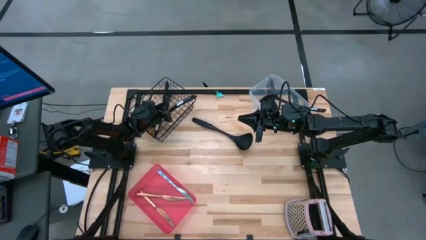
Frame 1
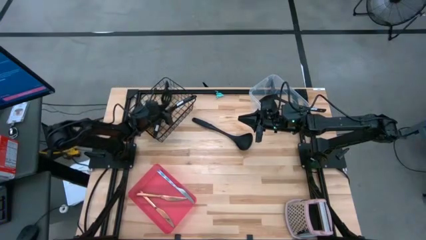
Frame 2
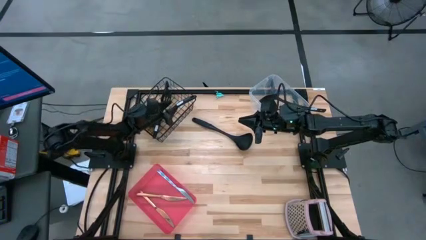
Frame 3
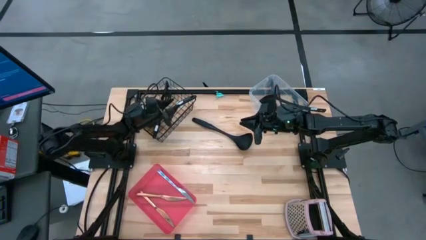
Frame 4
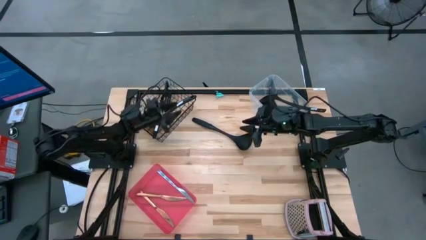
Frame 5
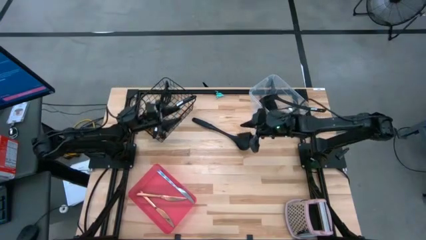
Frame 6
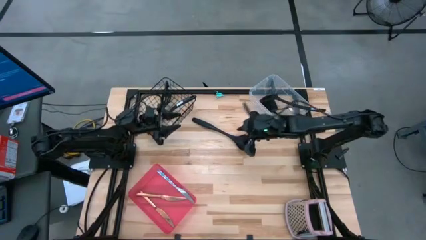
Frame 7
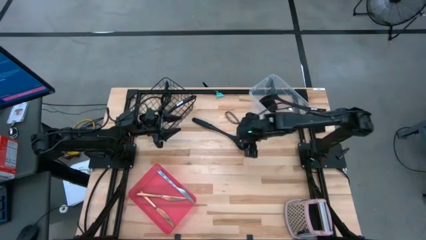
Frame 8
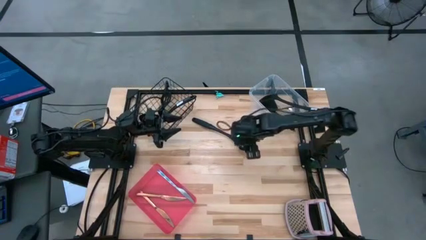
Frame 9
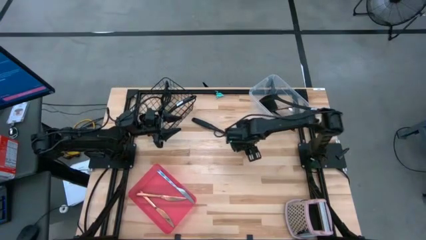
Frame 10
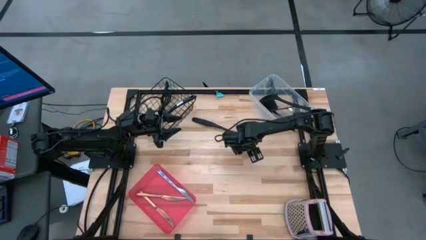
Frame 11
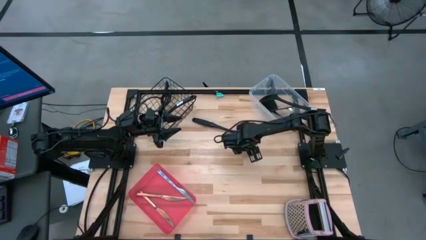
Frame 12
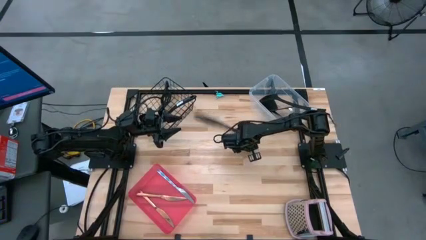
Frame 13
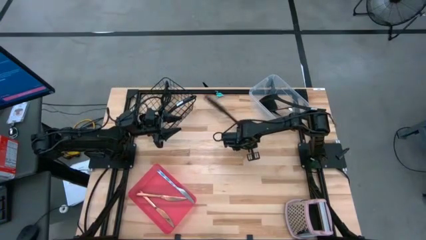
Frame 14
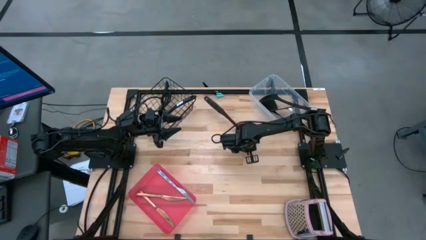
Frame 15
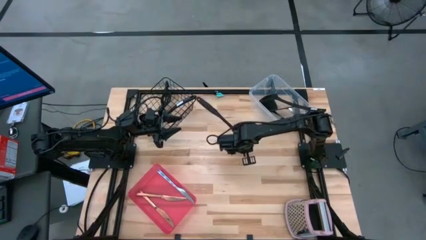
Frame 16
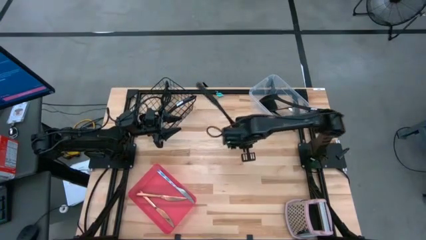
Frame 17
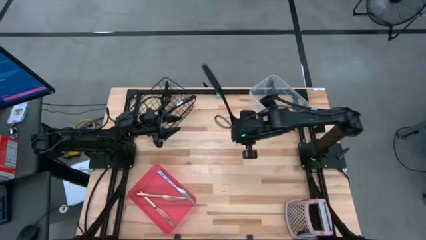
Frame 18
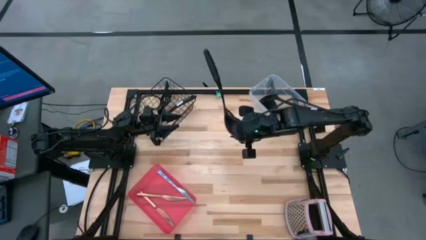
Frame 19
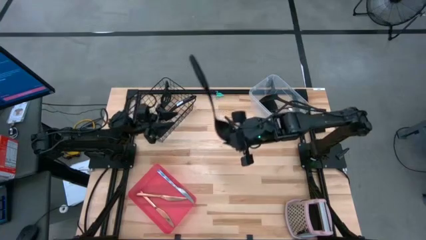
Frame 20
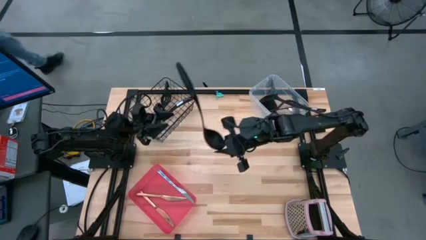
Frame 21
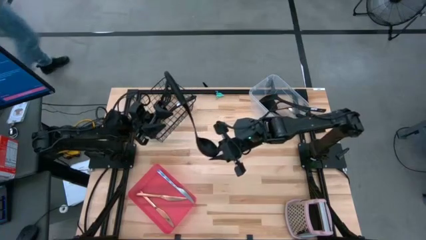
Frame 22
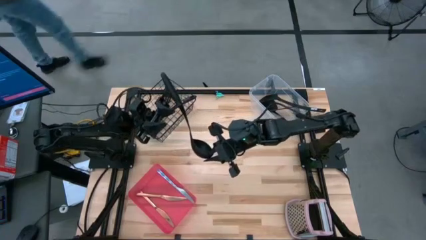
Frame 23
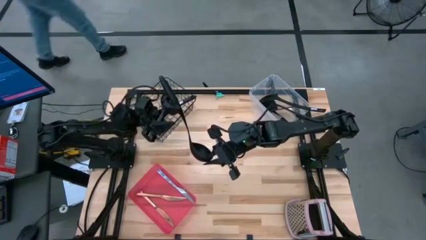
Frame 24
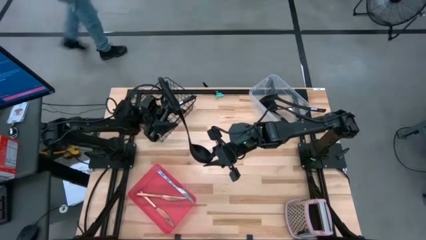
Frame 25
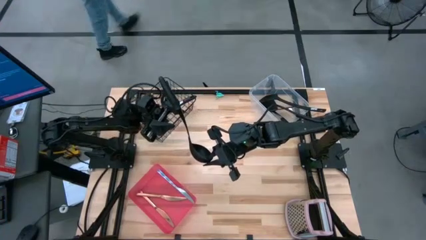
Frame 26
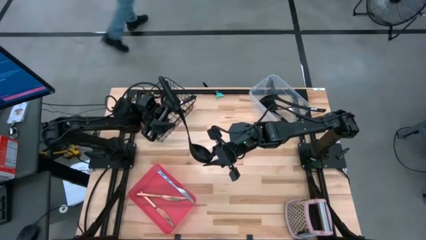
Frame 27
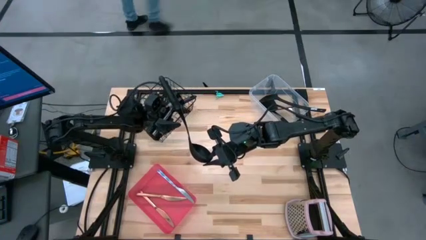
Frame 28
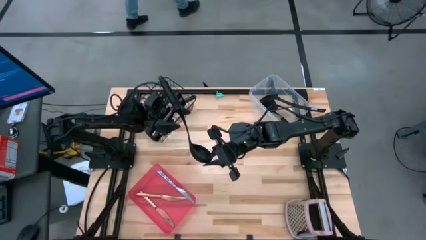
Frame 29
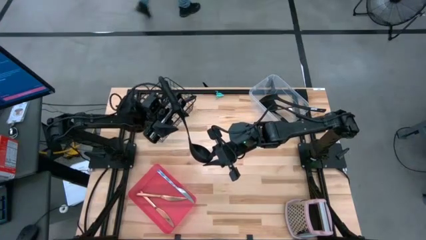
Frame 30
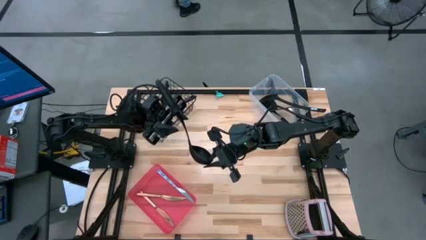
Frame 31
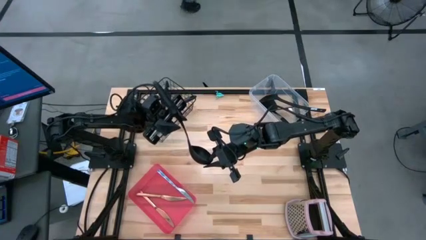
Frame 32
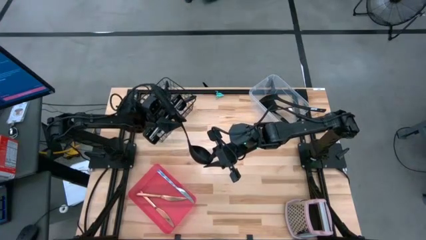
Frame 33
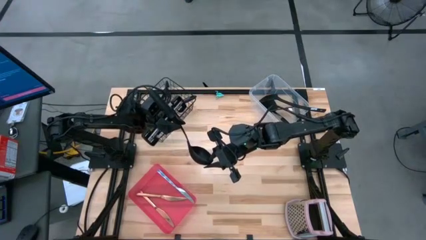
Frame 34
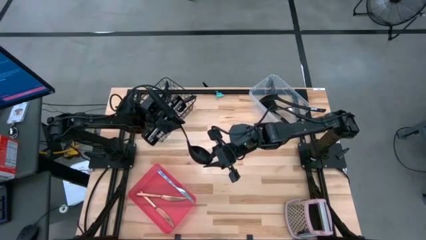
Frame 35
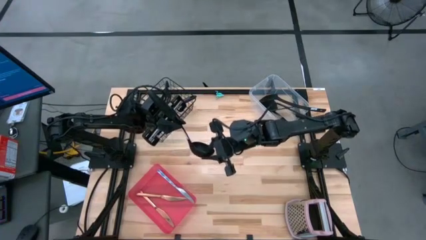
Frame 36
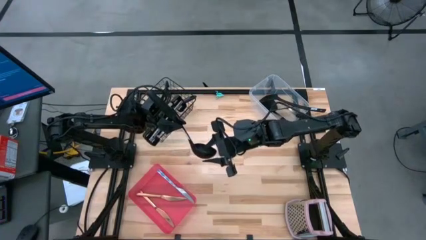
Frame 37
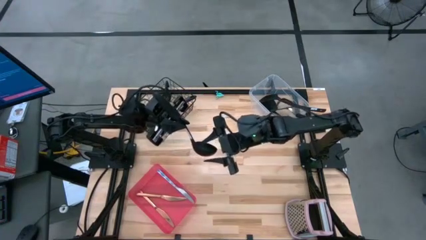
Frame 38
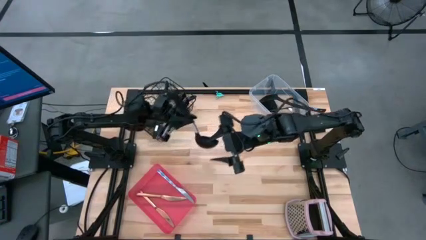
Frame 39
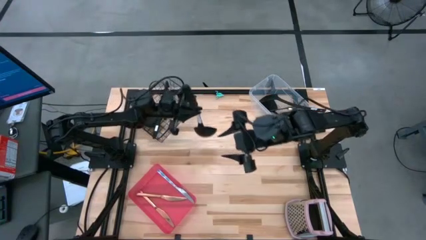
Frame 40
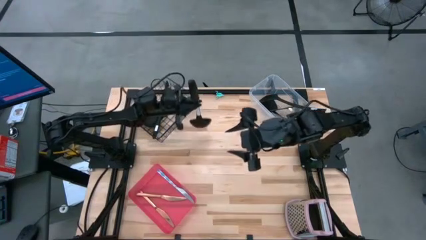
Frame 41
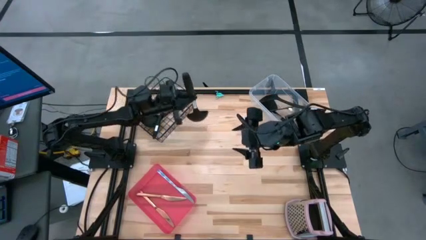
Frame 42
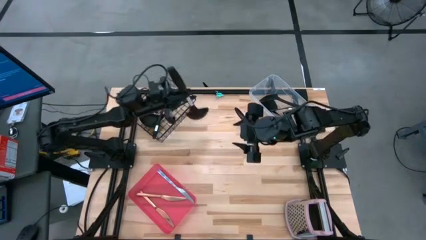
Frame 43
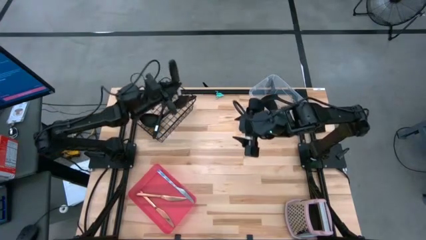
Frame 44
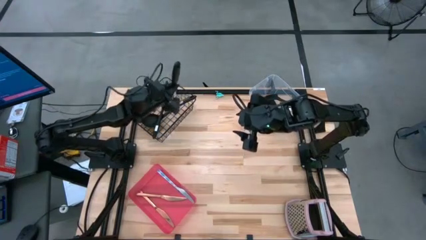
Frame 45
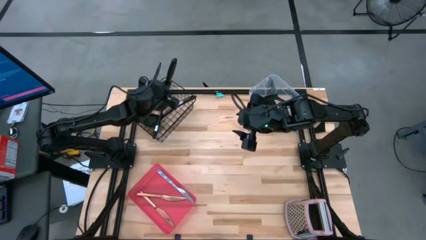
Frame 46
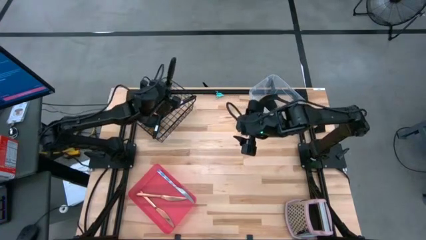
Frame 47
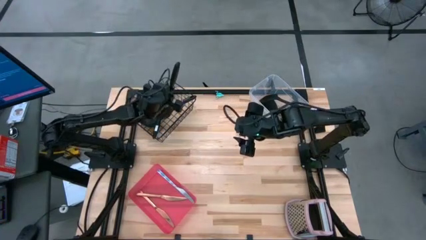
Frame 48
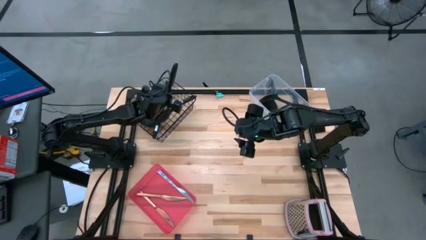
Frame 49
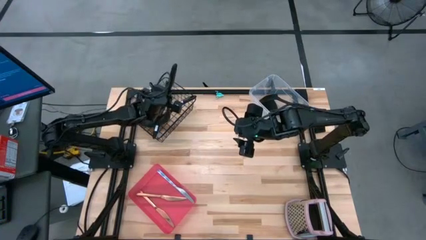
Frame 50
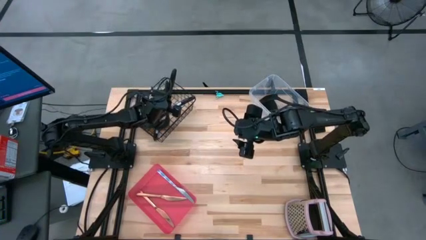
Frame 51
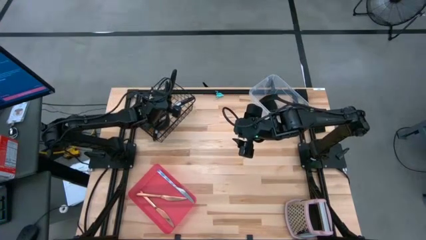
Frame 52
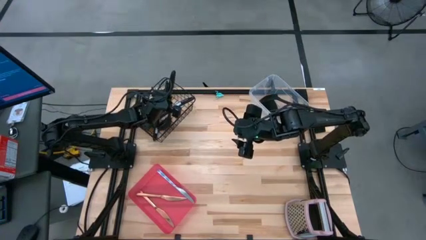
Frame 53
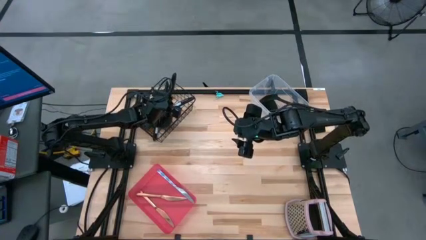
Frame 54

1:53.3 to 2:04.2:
Task: Pick & Place Kitchen Items
Put the black serving spoon into the wire basket

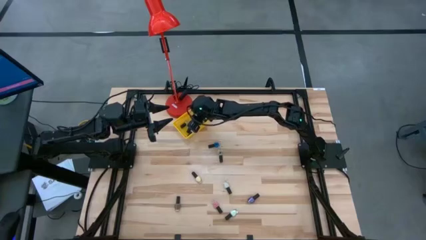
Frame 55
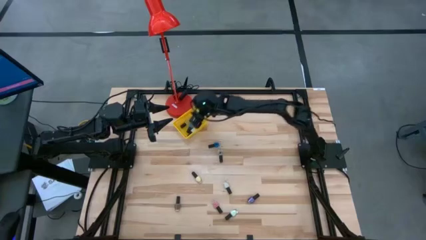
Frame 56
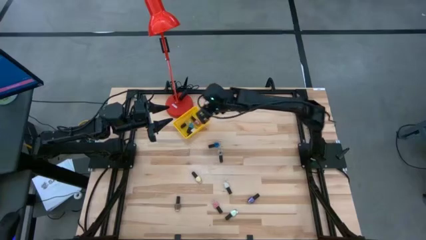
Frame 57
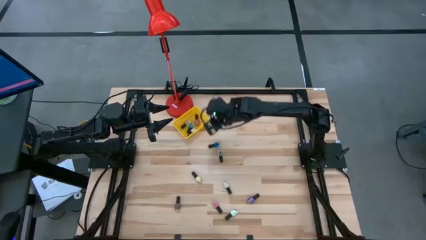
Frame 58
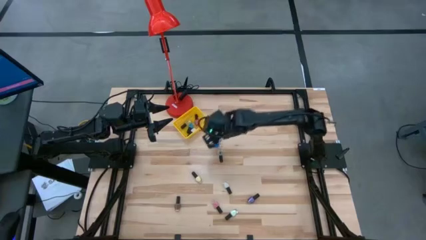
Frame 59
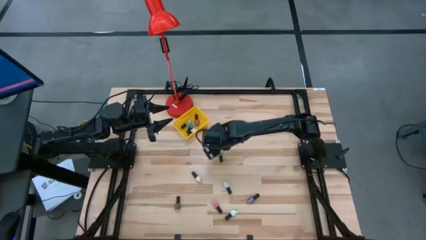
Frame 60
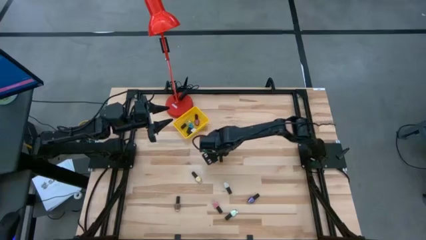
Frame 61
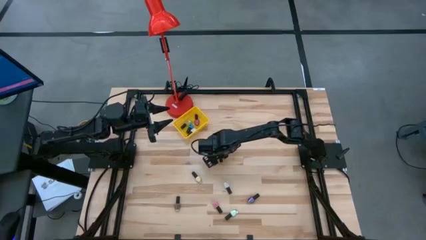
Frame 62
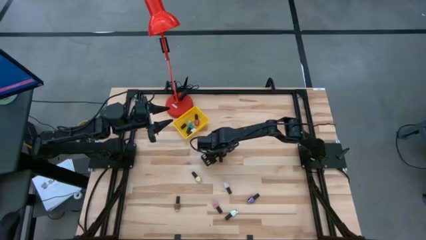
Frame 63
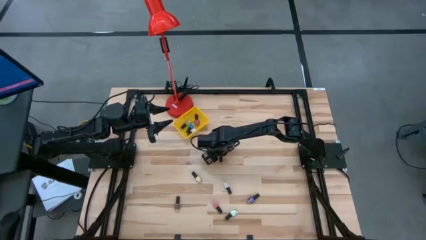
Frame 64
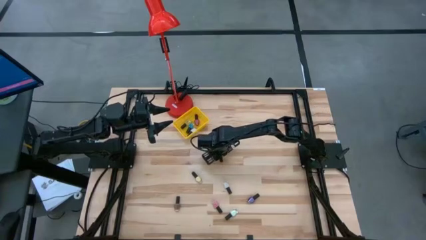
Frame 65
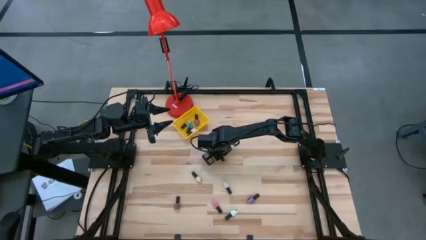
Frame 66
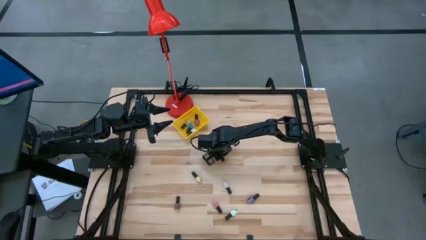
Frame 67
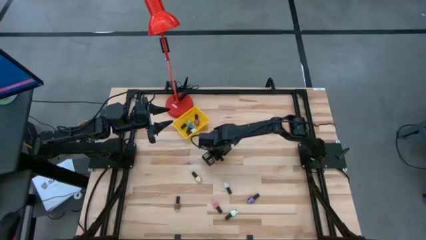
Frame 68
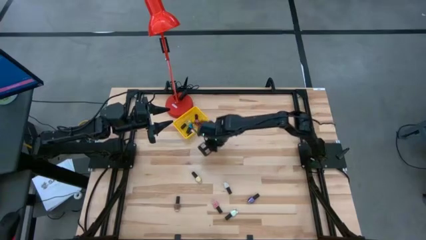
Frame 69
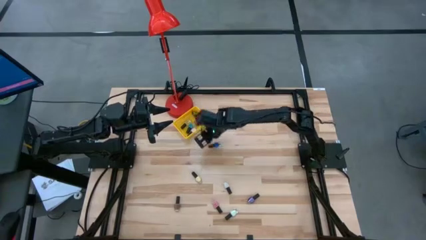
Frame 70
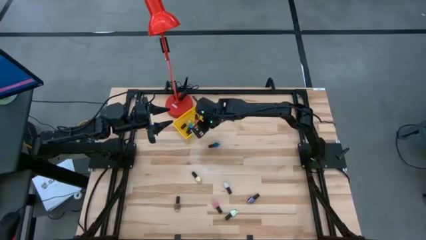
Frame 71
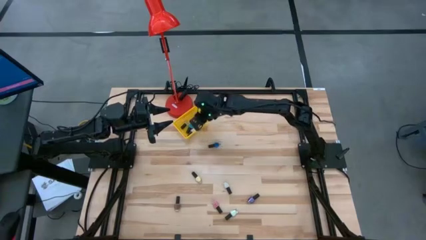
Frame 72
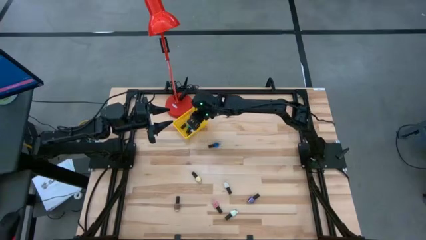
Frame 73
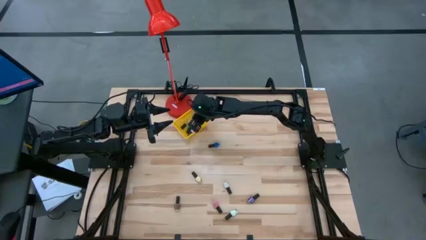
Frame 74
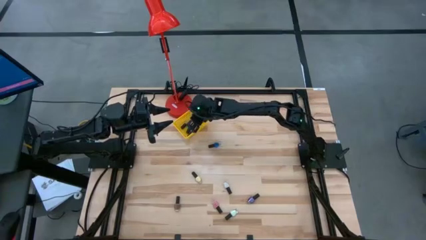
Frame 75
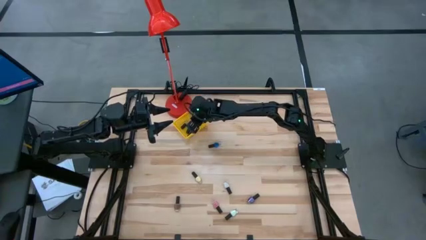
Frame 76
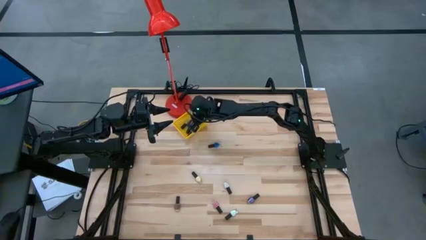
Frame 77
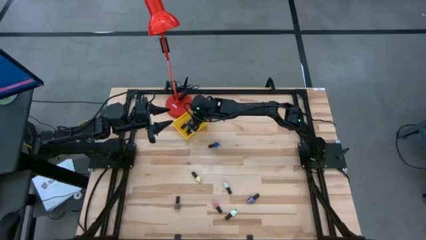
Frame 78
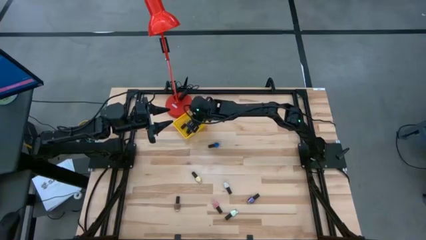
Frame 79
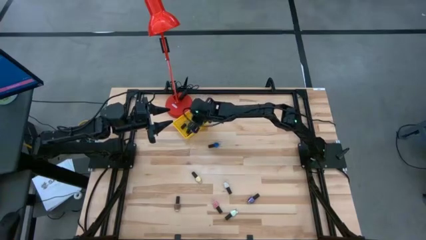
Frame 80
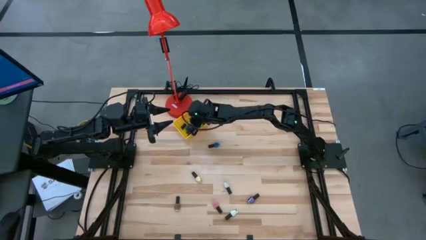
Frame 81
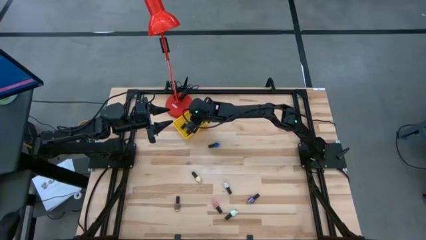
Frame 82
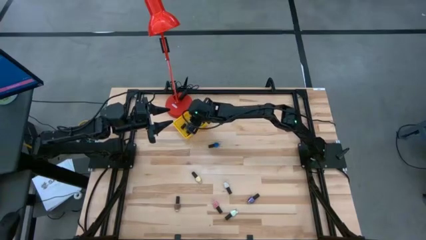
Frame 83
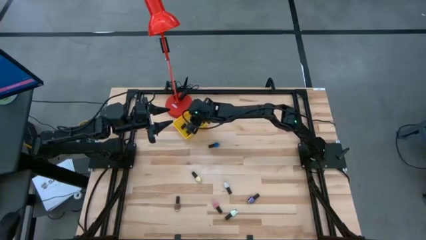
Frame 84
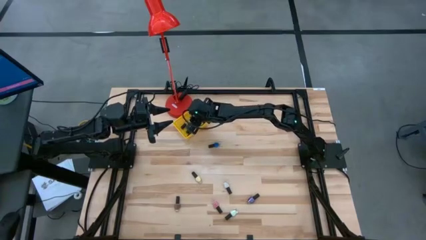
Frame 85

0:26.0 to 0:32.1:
Task: Pick & Place Nail Polish
Put the transparent nail polish into the yellow basket

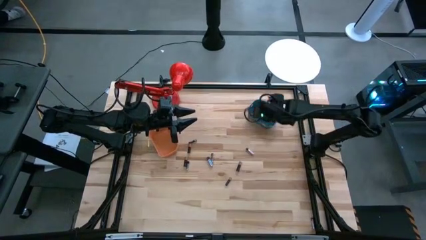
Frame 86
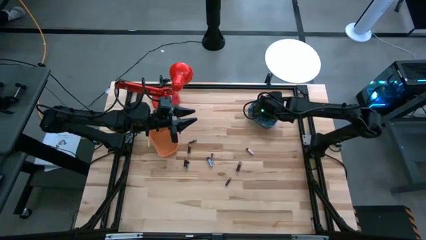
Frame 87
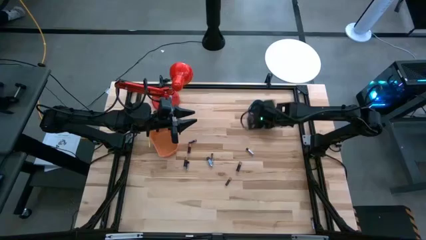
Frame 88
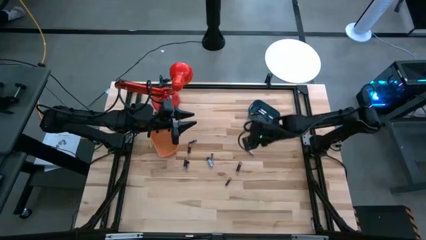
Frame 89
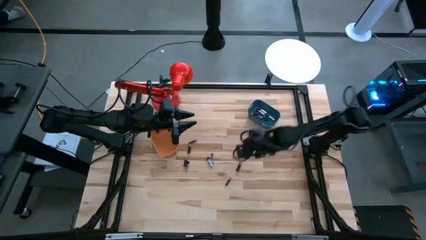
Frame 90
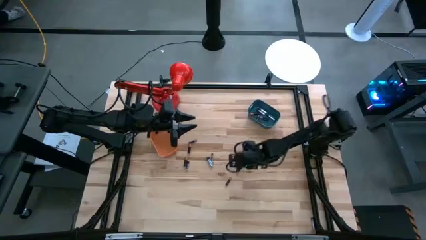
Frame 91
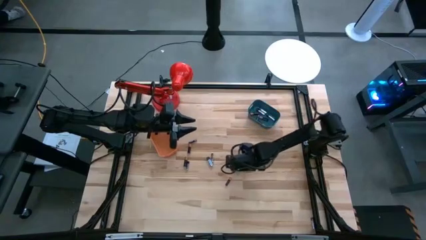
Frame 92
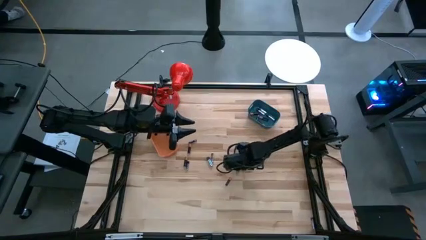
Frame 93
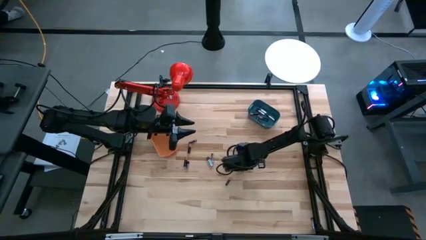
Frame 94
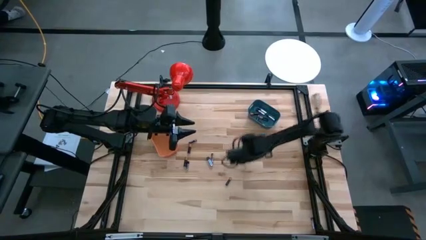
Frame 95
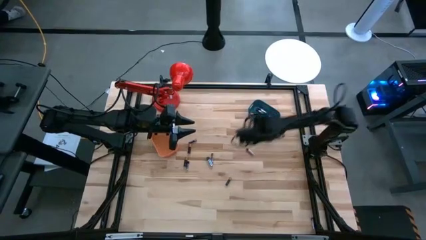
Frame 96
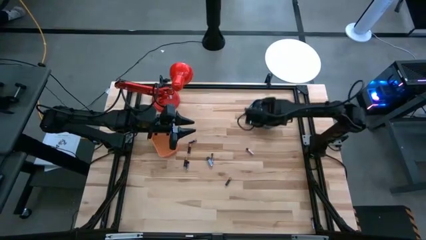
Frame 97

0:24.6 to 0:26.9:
Task: Sort batteries
Put the black battery into the blue bin
